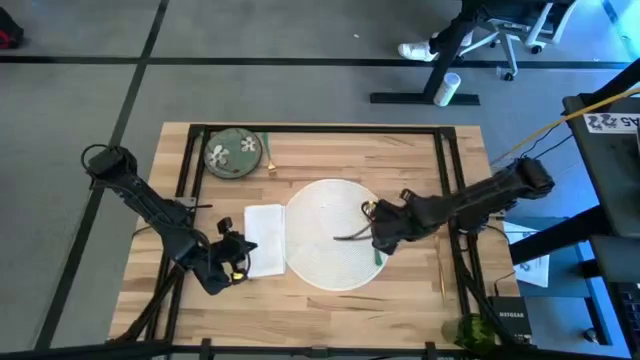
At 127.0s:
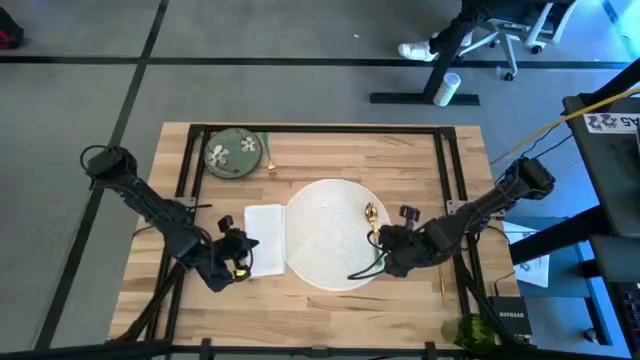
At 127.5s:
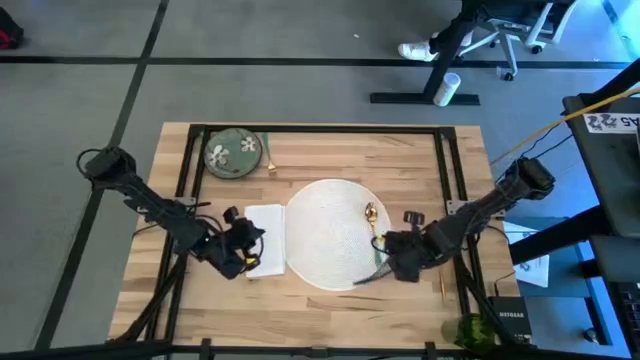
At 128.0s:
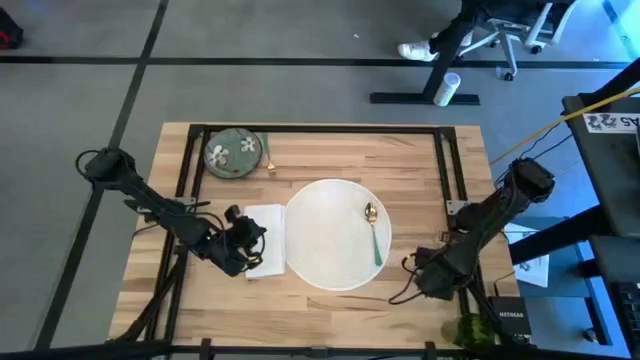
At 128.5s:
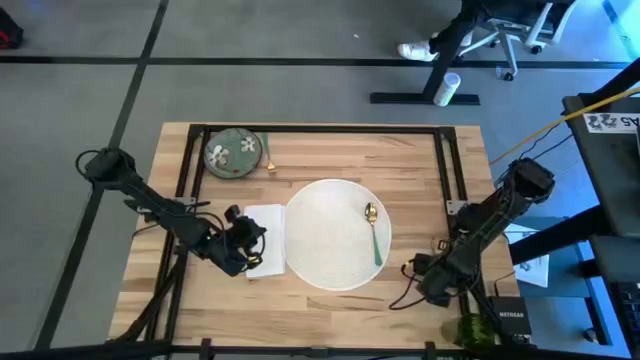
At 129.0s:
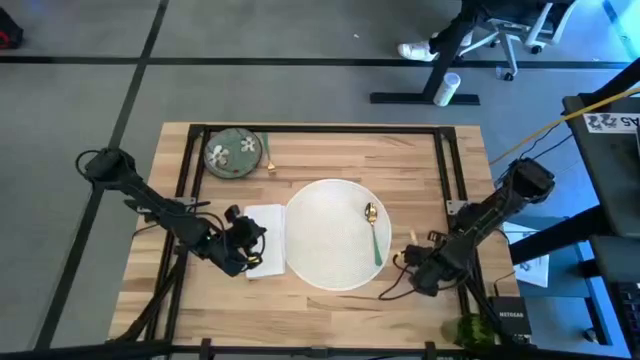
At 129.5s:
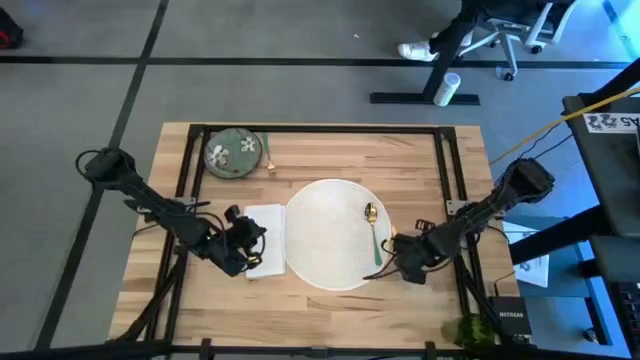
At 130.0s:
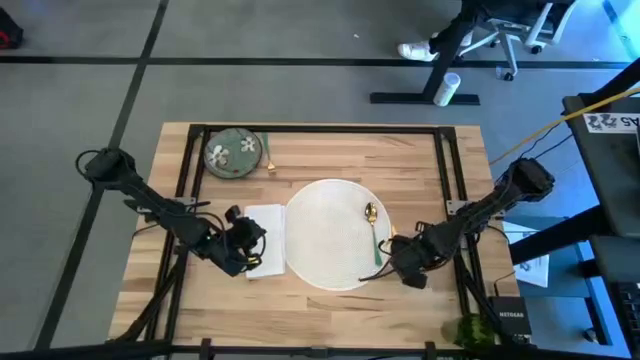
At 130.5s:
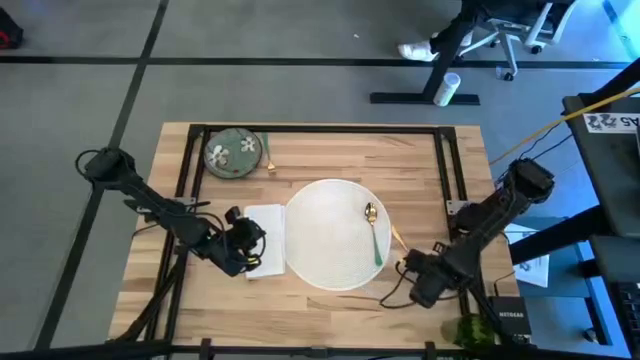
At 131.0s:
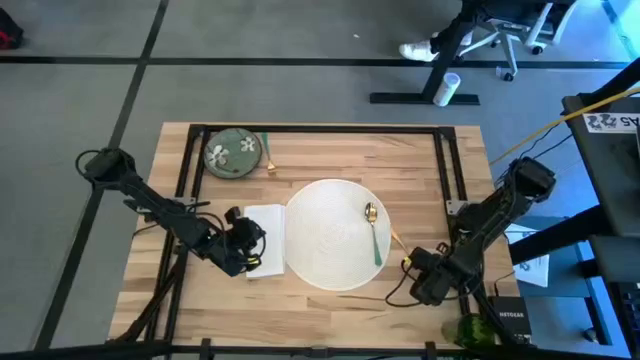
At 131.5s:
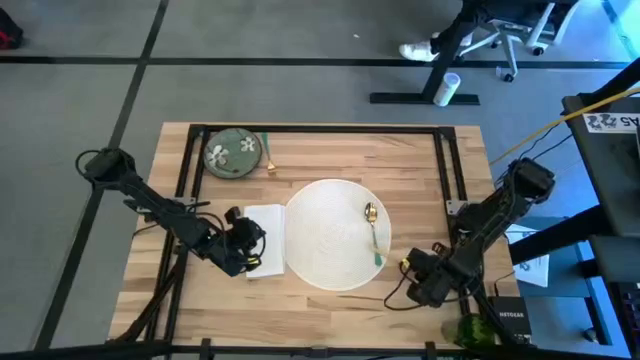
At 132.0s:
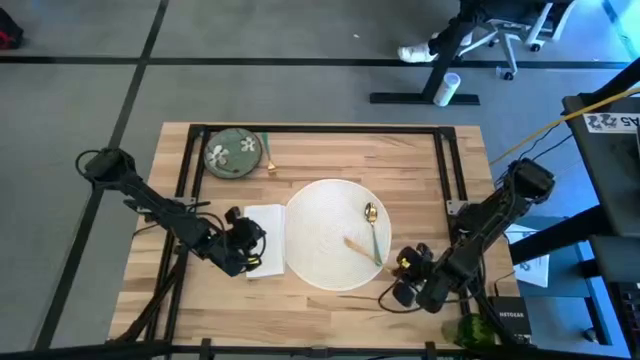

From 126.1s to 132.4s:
Task: Set table place
Put the gold butter knife to the left of the green spoon on the white table mat

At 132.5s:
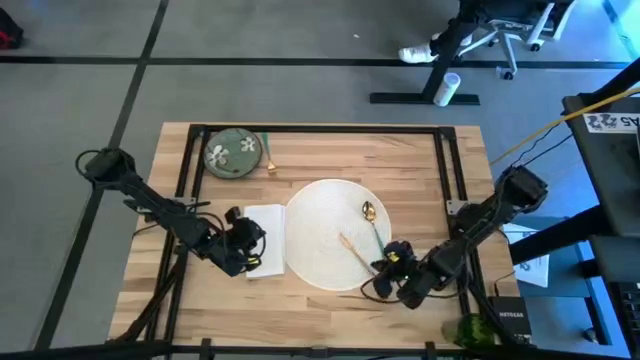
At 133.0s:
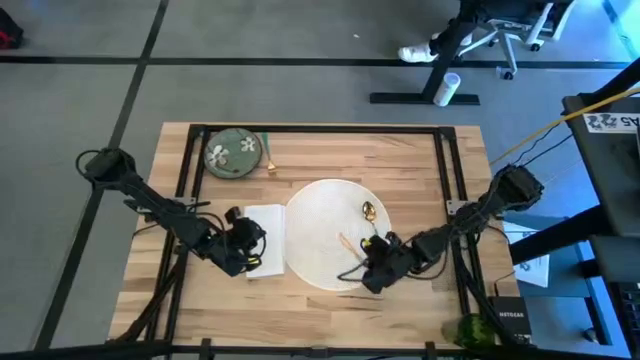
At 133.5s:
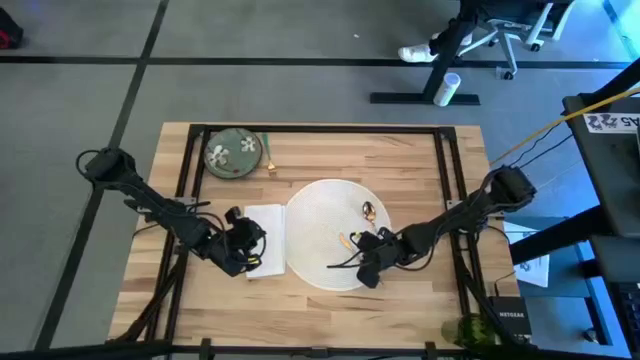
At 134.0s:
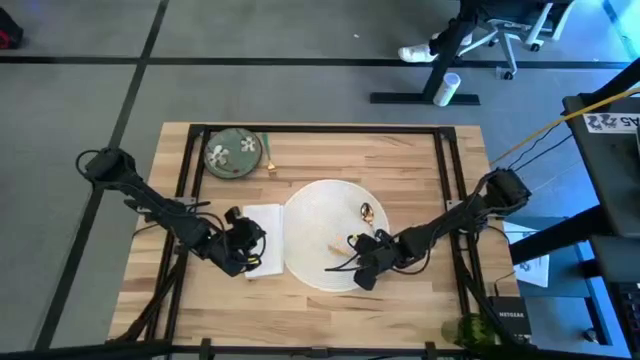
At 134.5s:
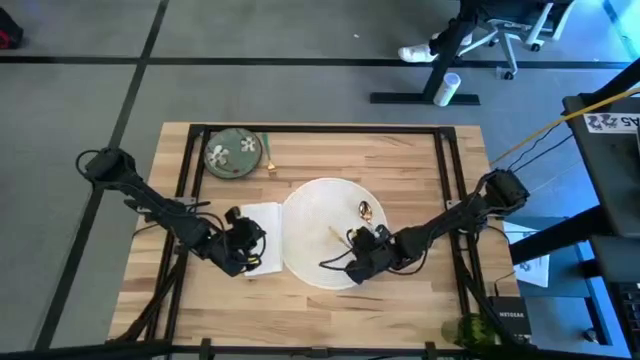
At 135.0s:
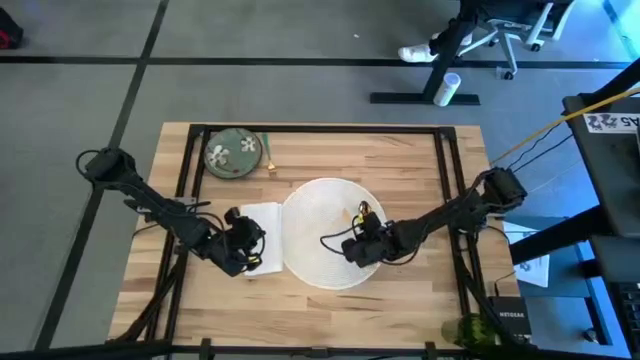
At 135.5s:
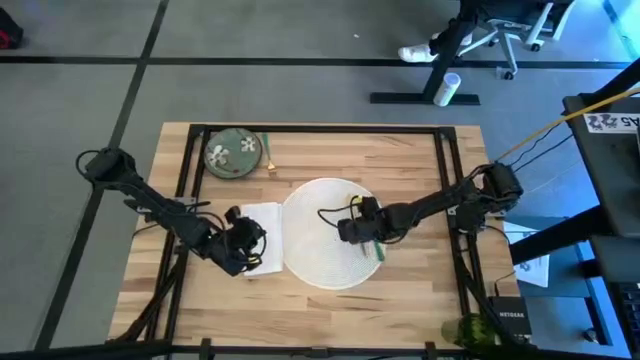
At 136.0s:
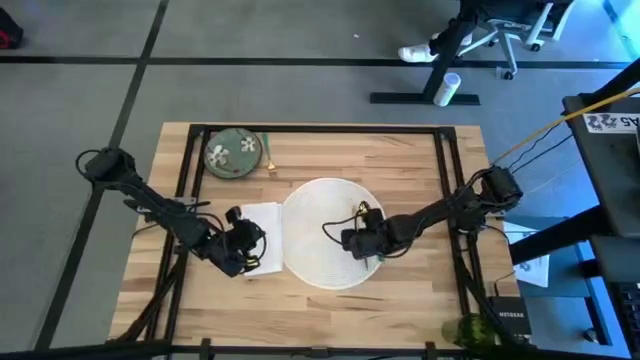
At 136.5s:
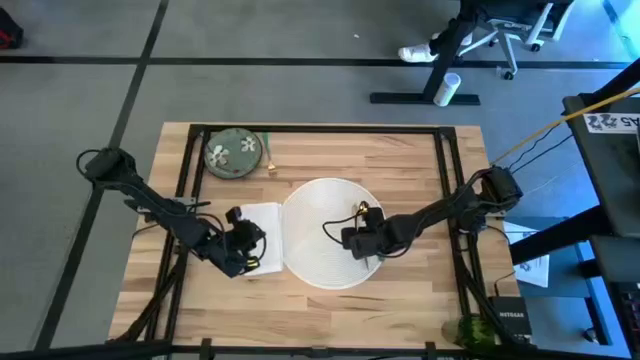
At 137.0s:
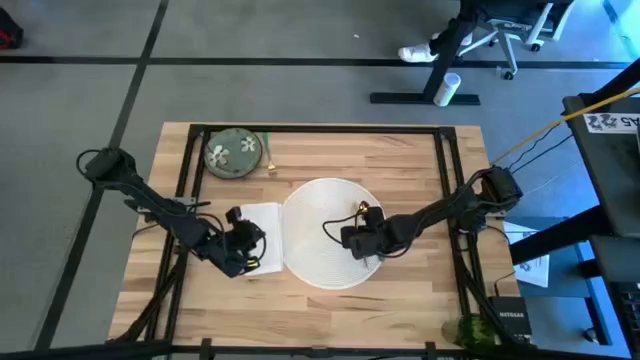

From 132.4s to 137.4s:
Put the gold butter knife to the left of the green spoon on the white table mat

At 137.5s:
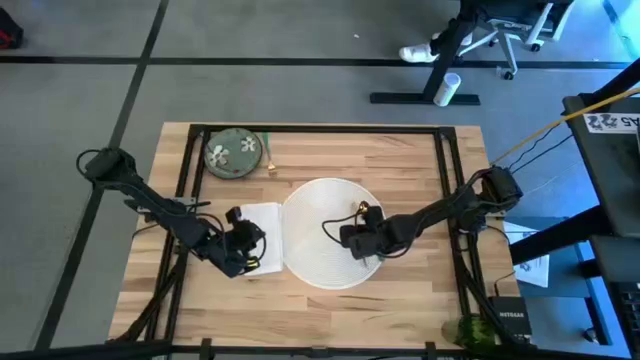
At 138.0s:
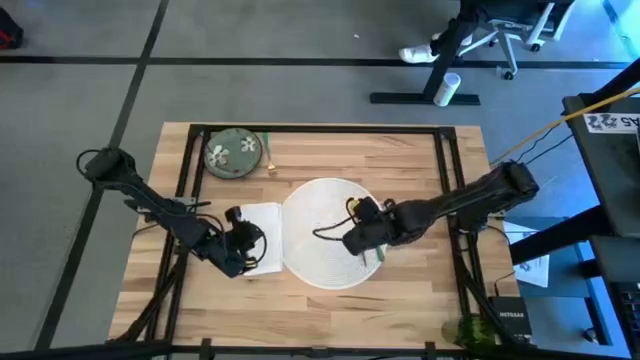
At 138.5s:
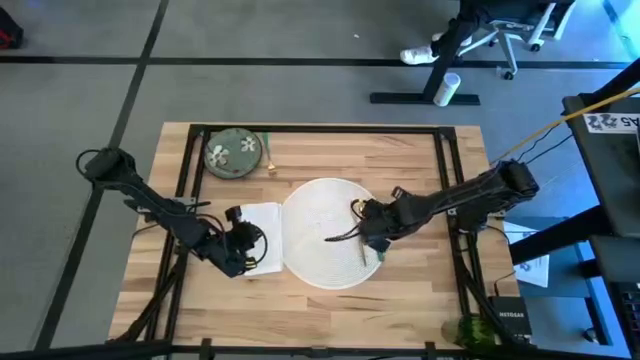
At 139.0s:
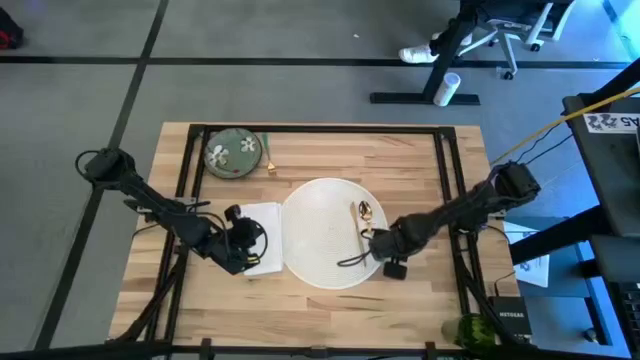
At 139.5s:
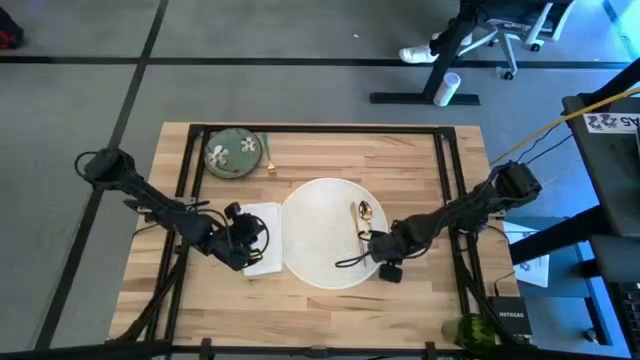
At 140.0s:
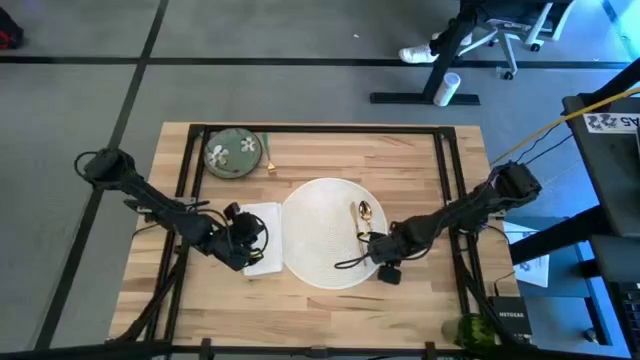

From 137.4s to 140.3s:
Adjust the green spoon on the white table mat

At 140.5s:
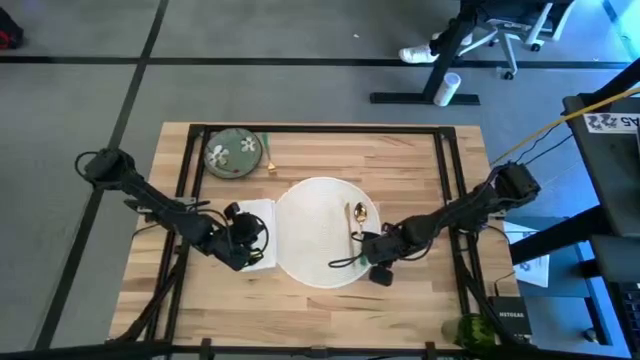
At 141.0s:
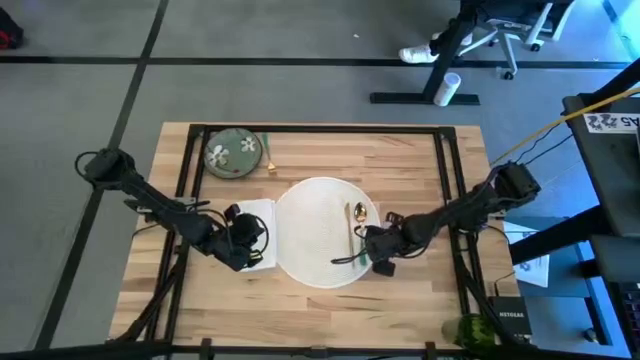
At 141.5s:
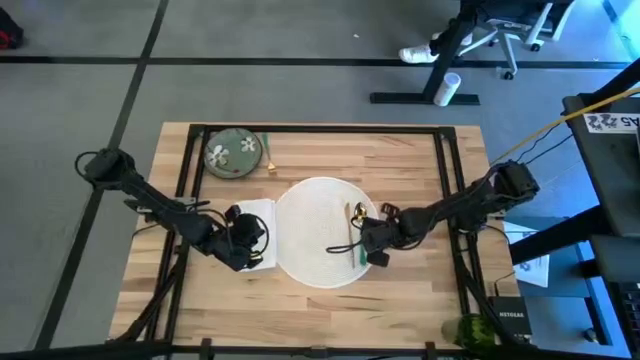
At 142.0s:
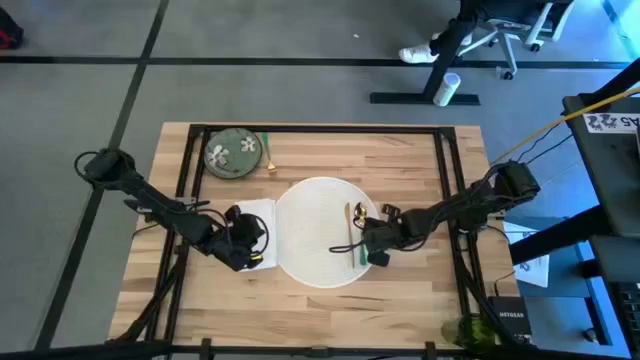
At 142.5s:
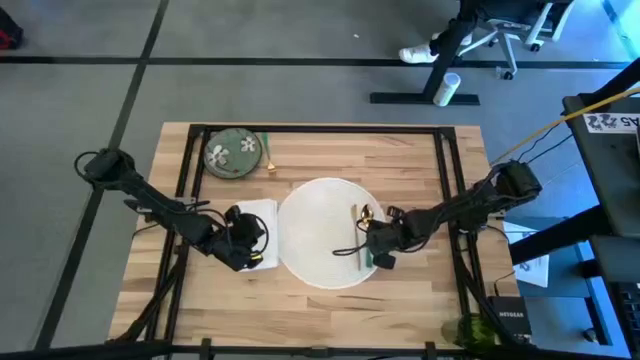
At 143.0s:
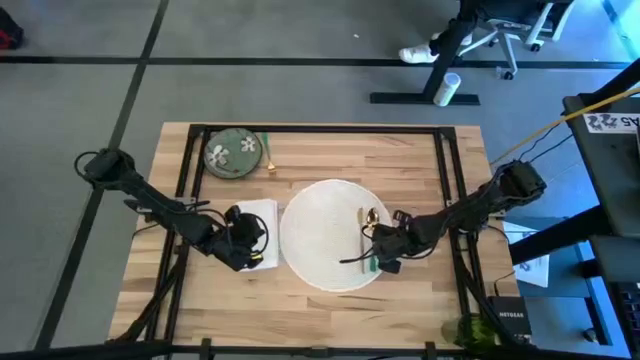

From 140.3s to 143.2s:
Adjust the white table mat
